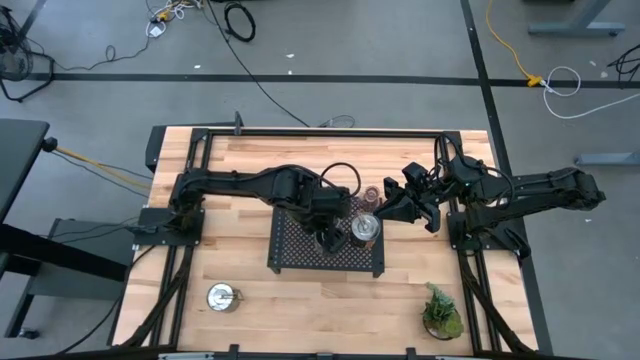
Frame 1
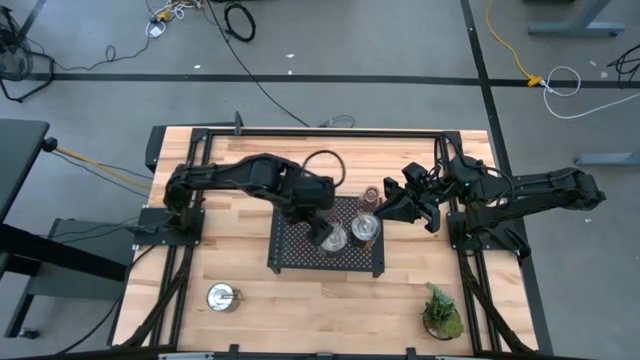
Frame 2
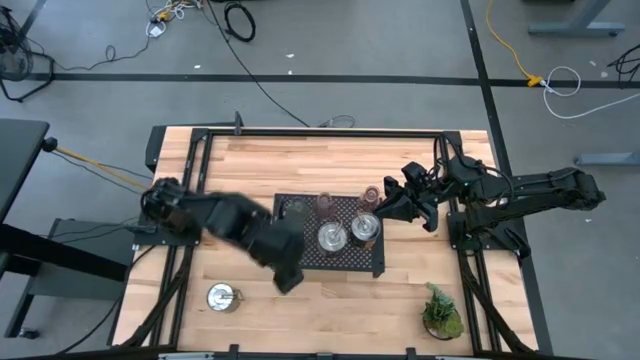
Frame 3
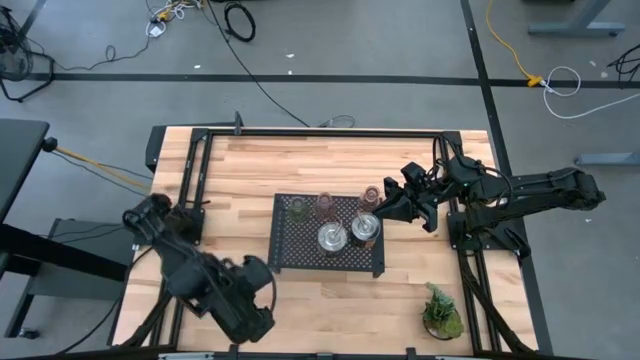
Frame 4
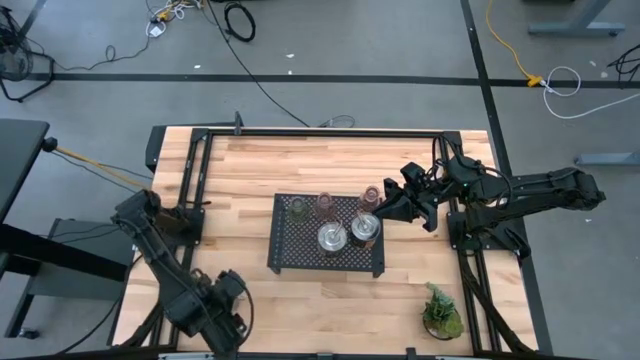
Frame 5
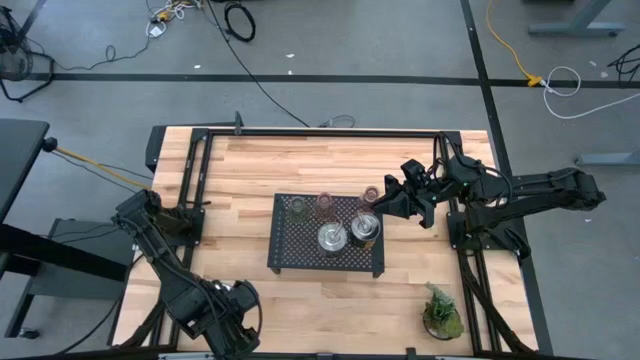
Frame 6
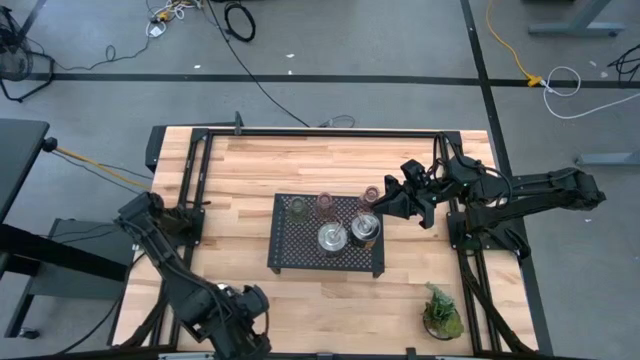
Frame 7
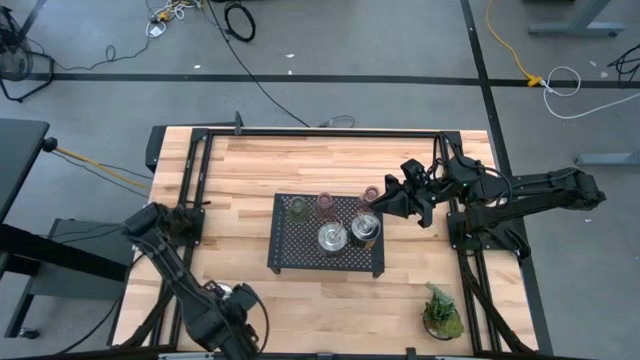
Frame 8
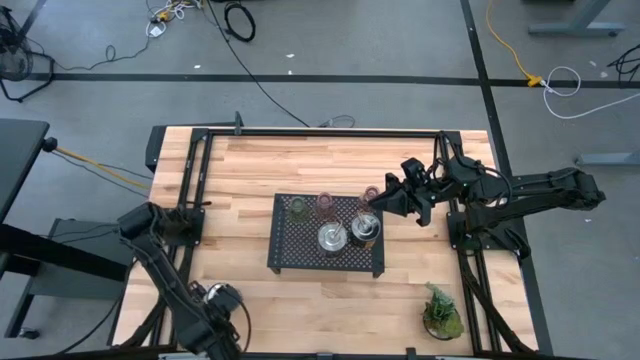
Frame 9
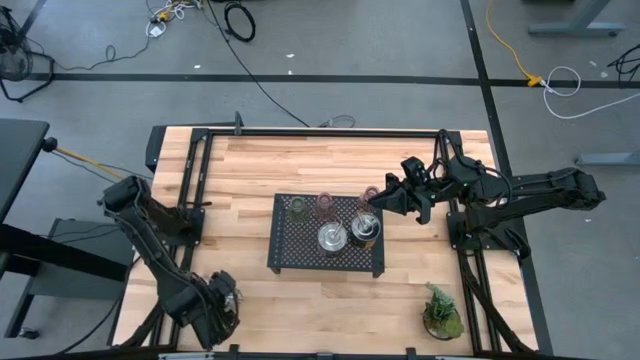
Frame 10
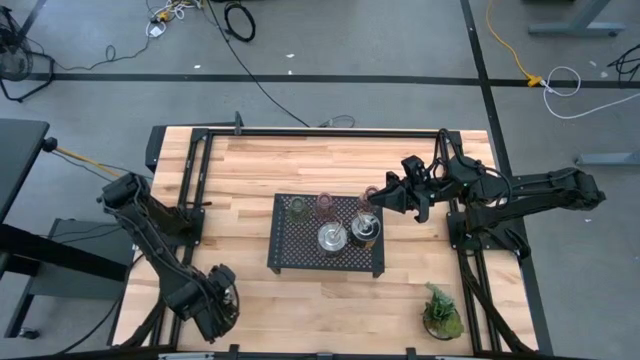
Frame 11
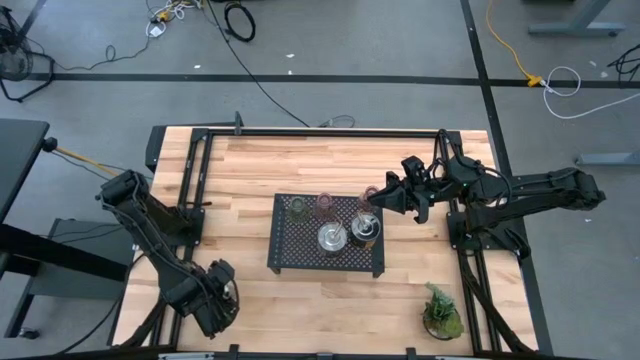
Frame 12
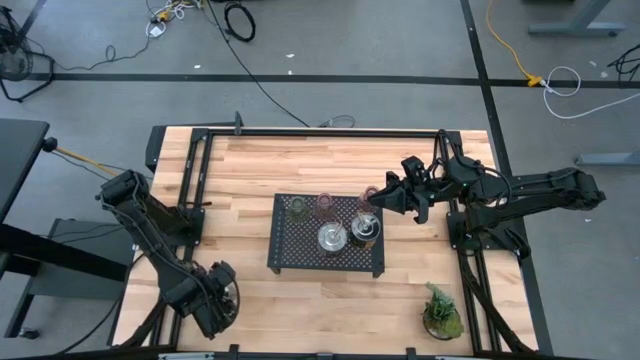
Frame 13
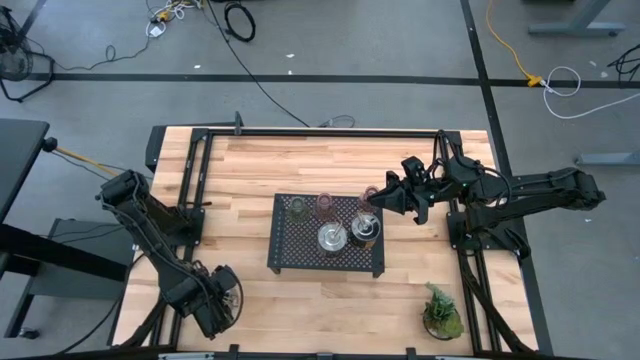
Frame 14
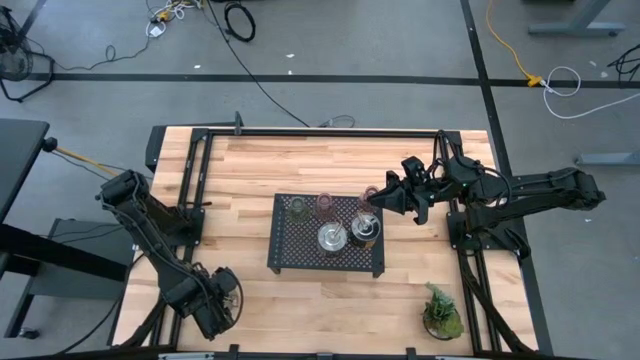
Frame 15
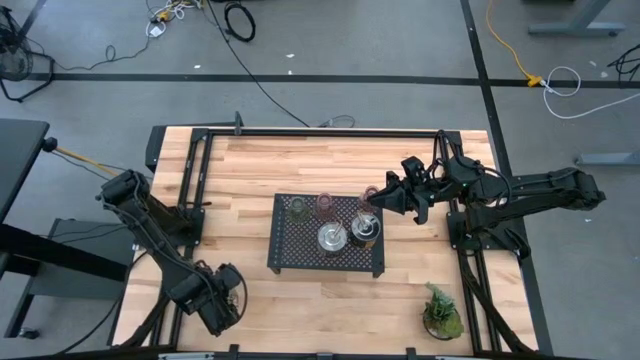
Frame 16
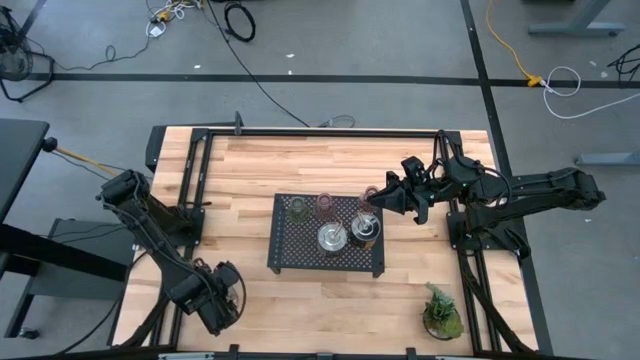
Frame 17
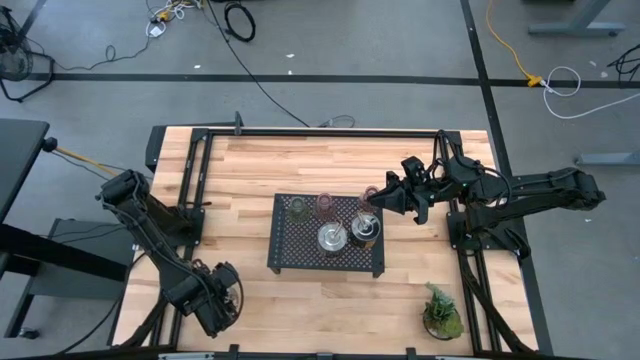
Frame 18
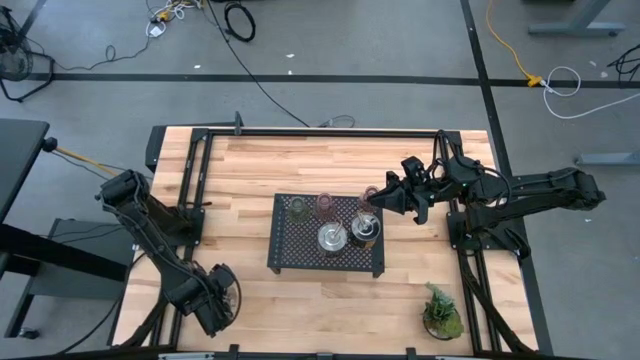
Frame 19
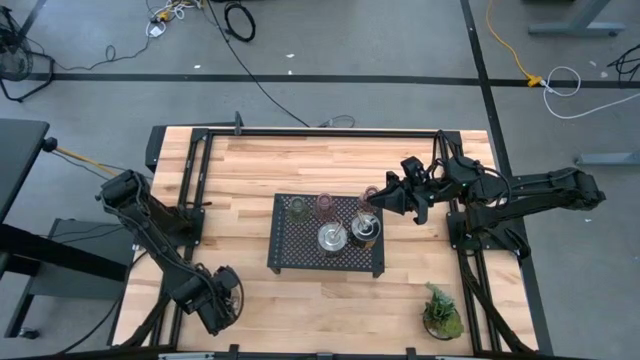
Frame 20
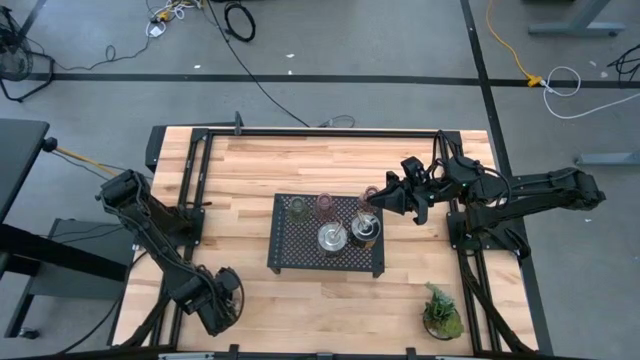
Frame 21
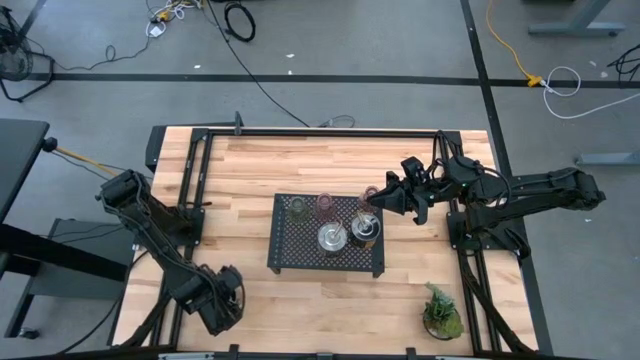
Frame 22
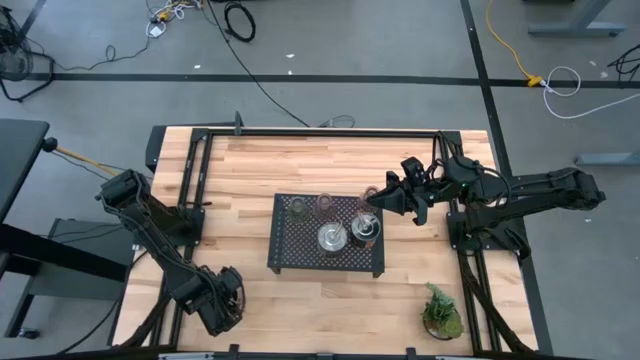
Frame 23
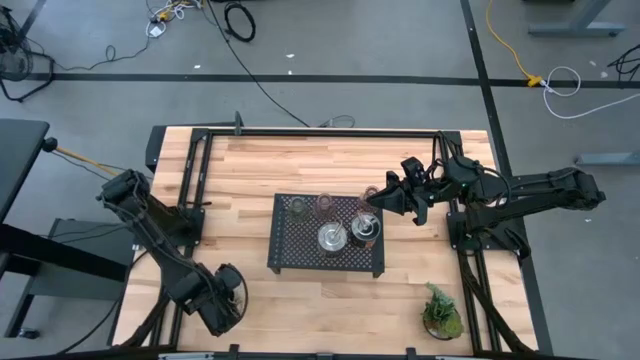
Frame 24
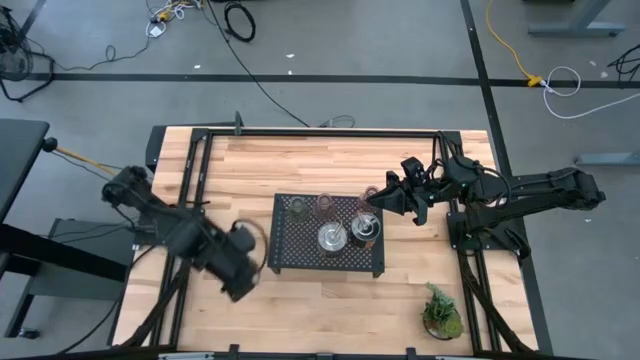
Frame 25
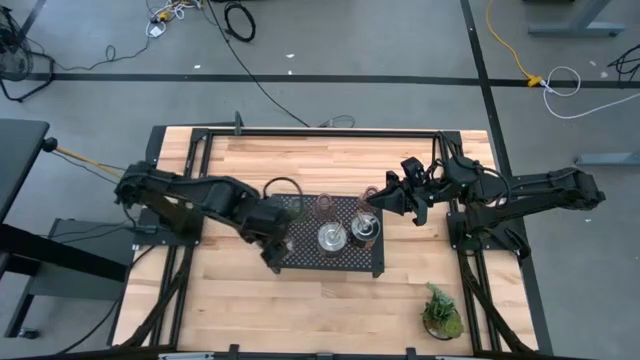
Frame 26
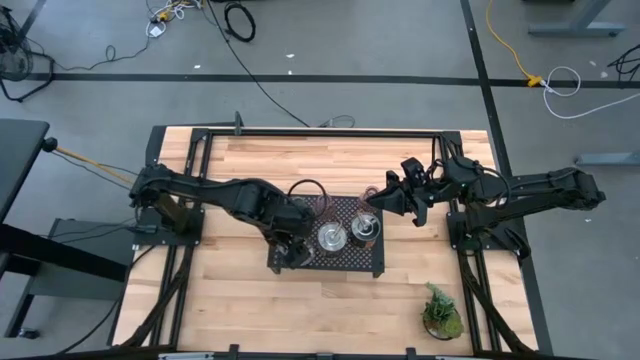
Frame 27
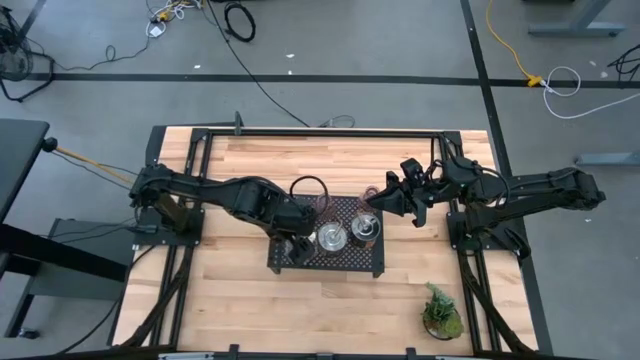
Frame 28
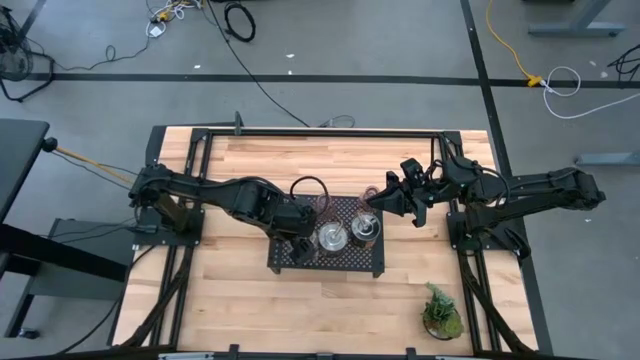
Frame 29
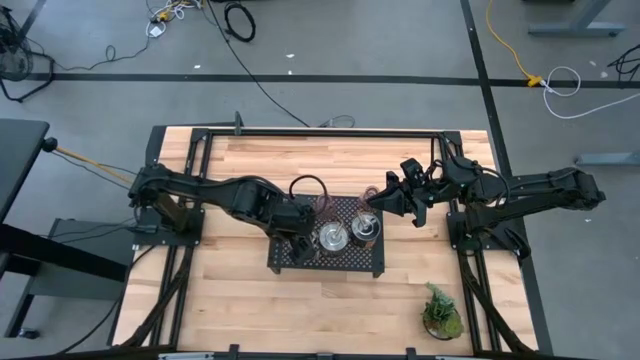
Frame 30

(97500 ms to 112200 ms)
Task: Pick & Place candle stick holders
Put the silver scented candle on the shelf

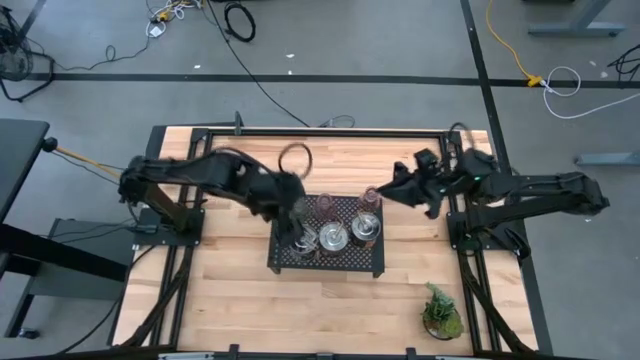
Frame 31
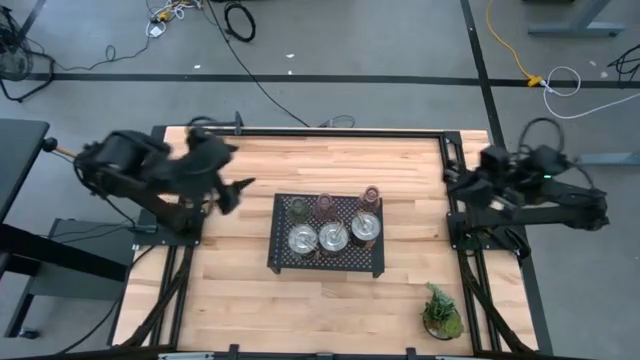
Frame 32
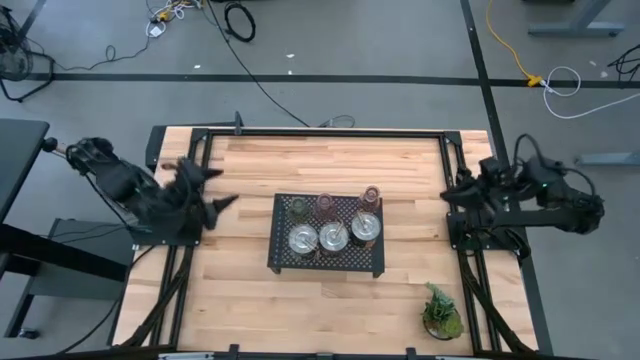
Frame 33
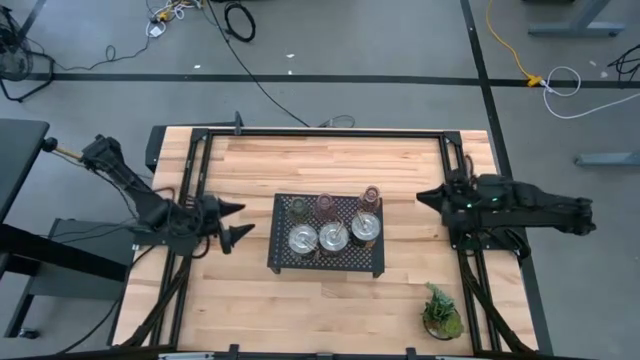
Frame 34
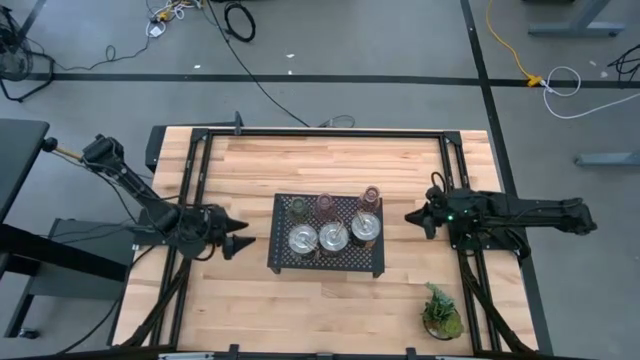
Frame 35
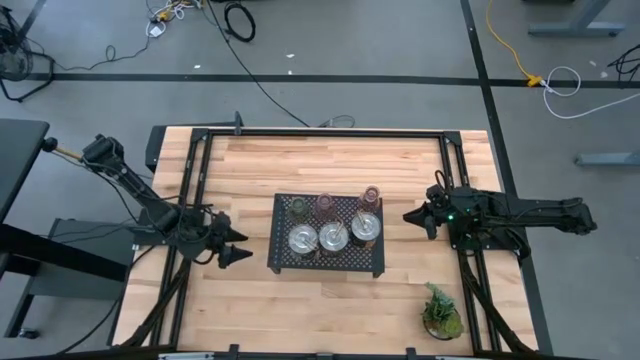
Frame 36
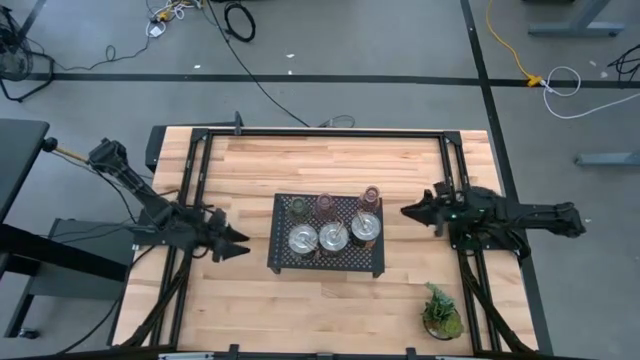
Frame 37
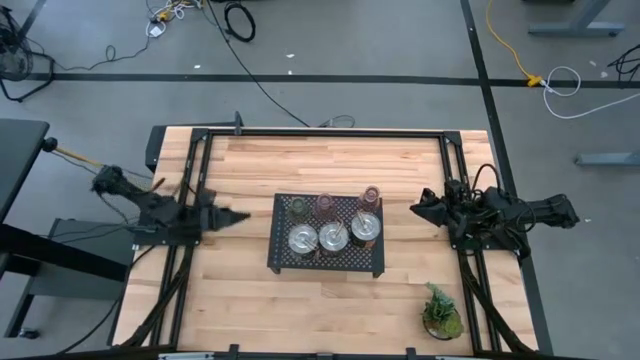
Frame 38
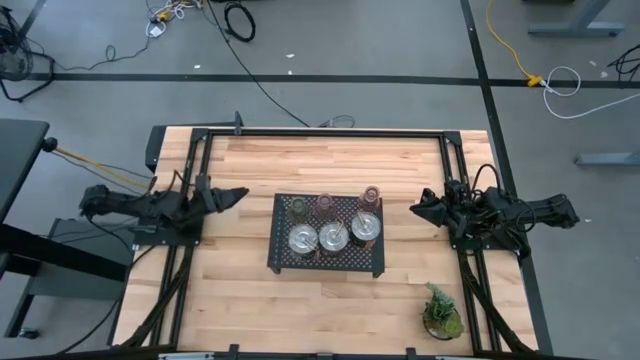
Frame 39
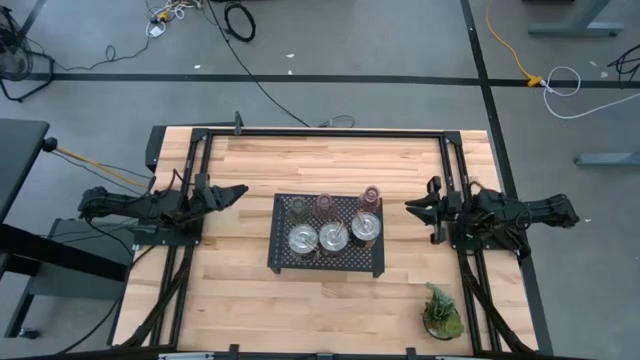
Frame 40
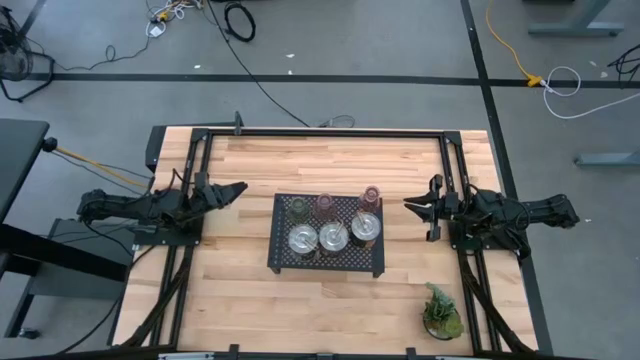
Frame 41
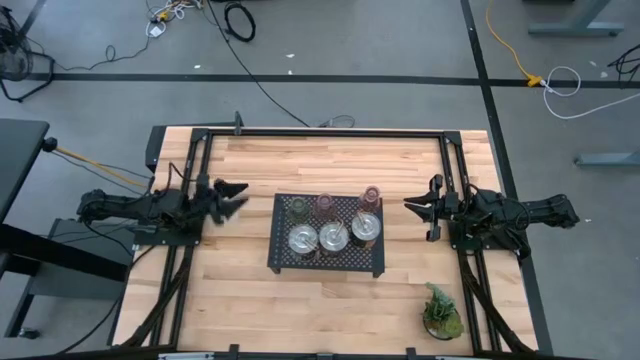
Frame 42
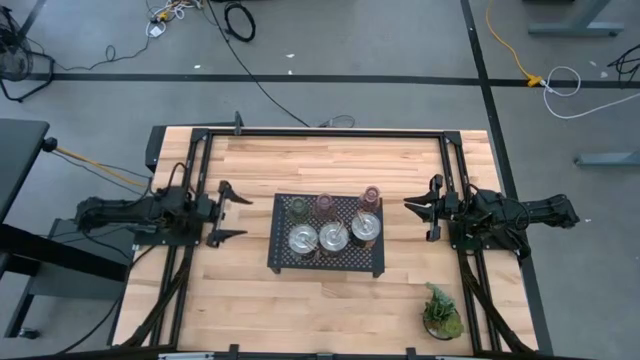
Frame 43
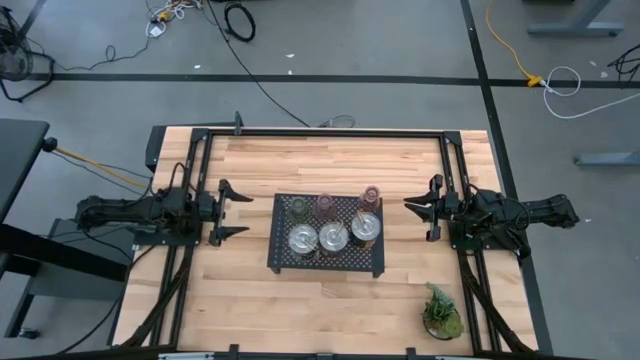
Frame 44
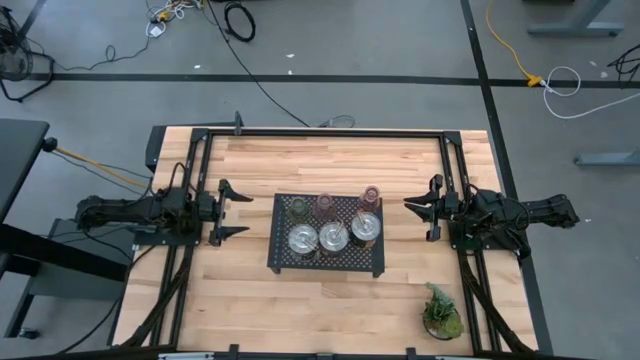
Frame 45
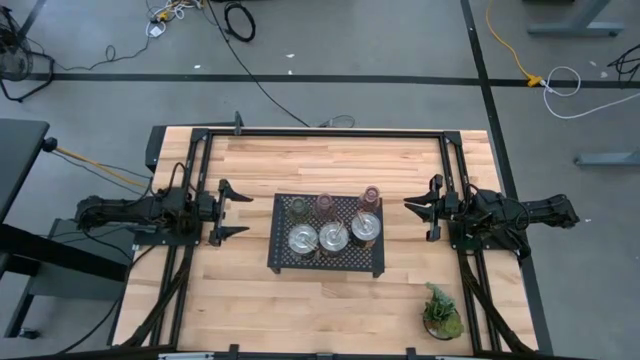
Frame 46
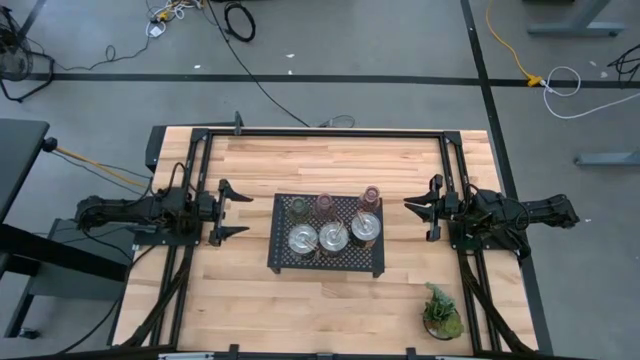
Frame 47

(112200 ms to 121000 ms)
Return to Home Position
